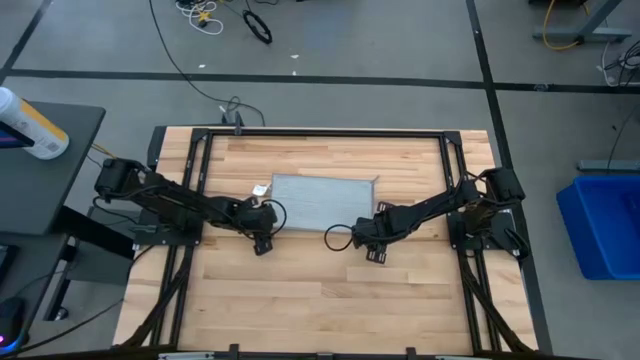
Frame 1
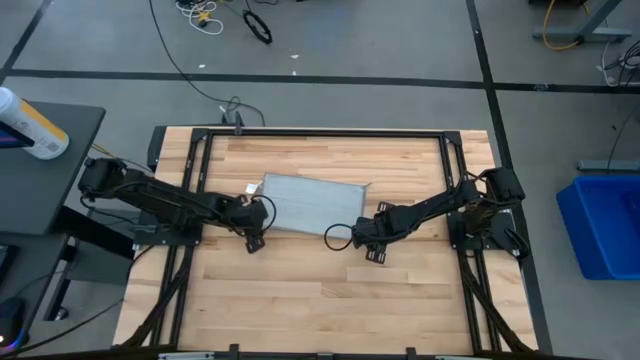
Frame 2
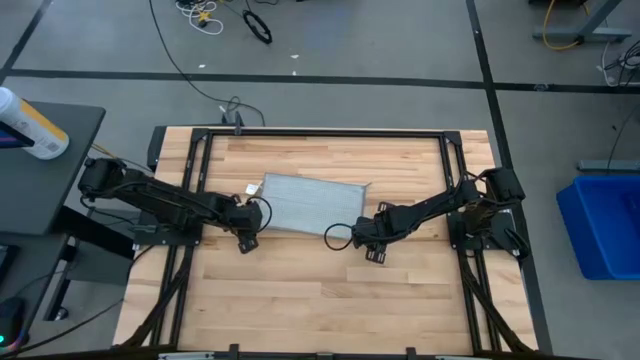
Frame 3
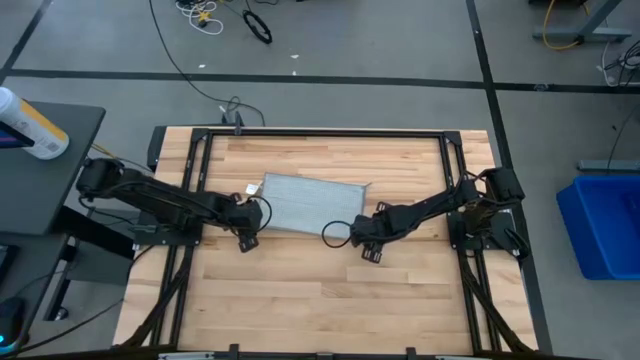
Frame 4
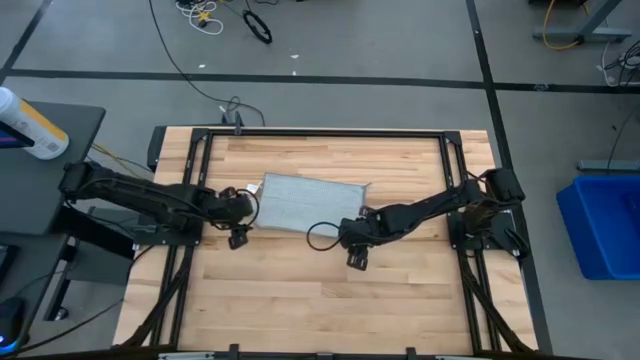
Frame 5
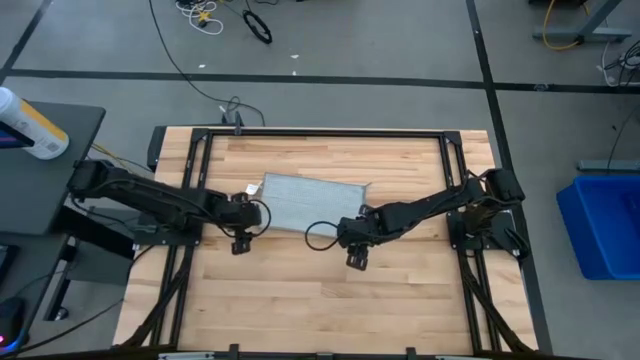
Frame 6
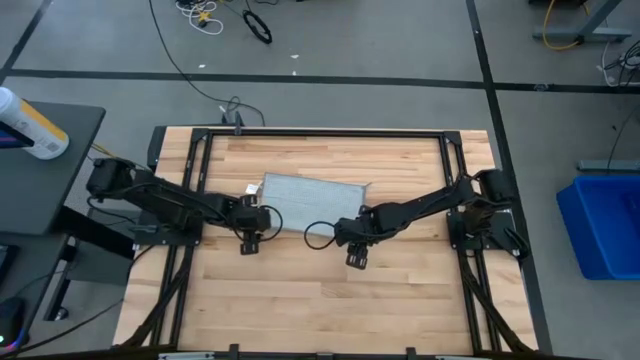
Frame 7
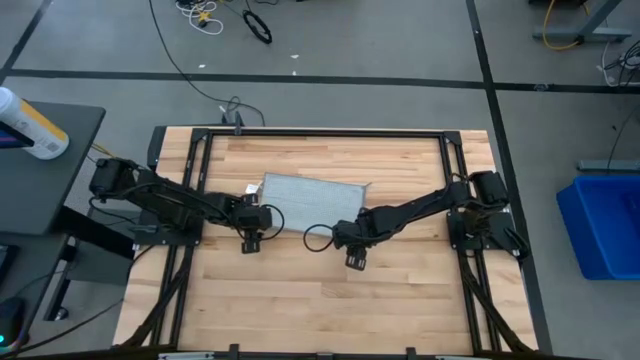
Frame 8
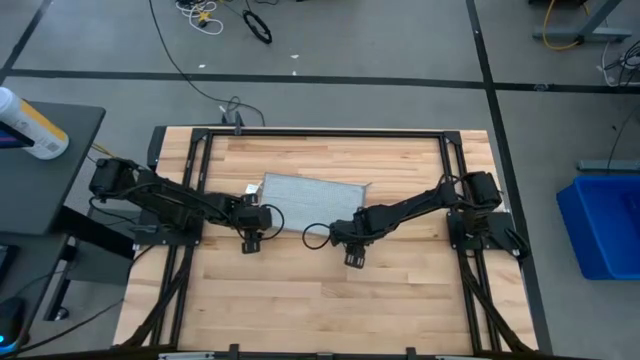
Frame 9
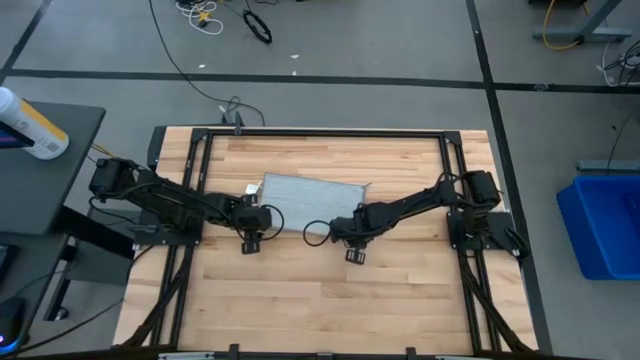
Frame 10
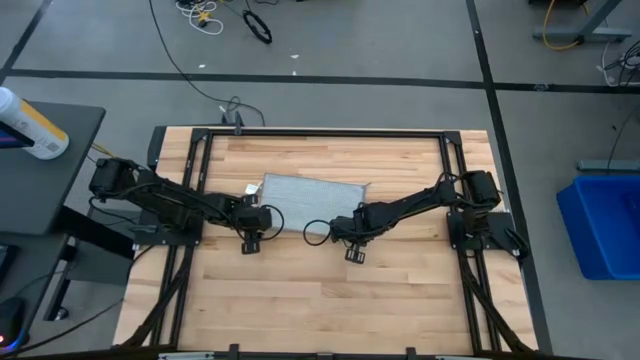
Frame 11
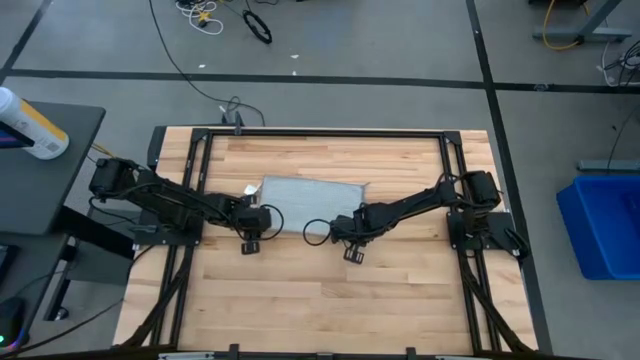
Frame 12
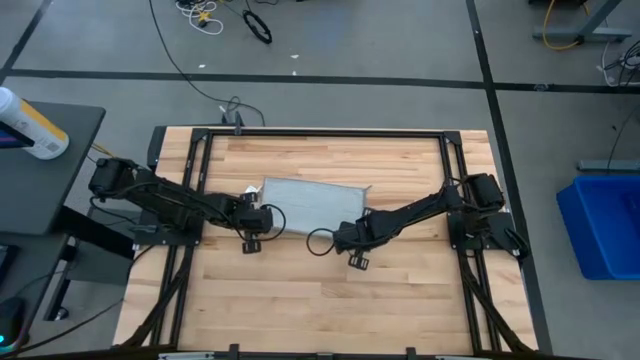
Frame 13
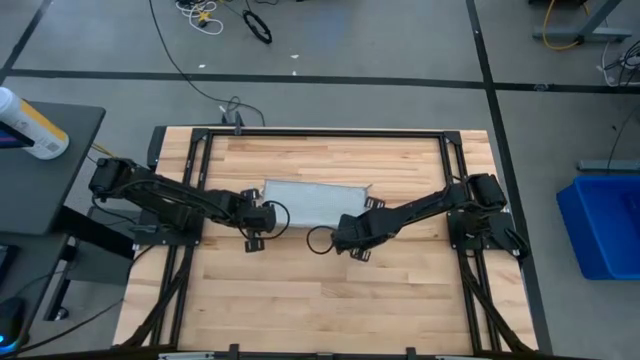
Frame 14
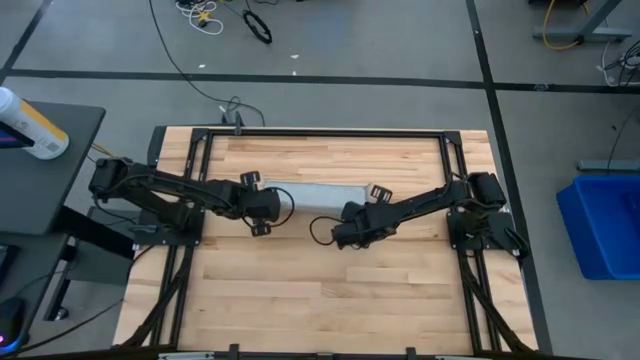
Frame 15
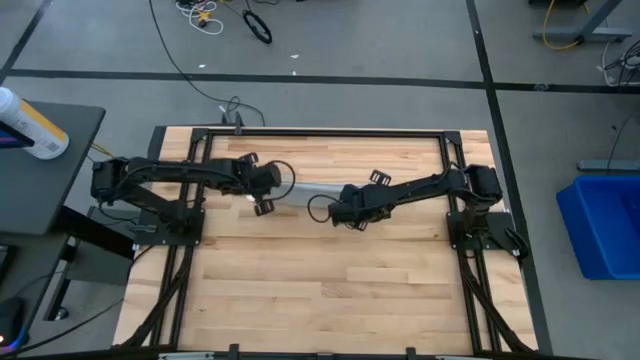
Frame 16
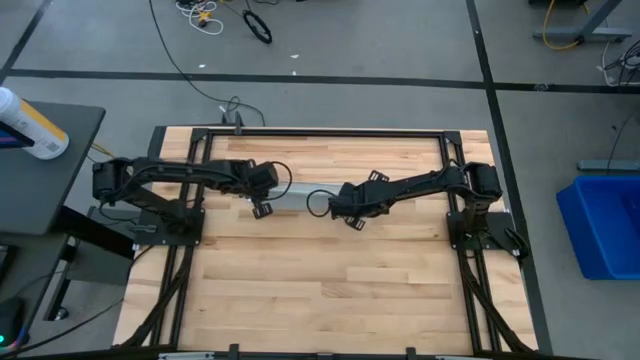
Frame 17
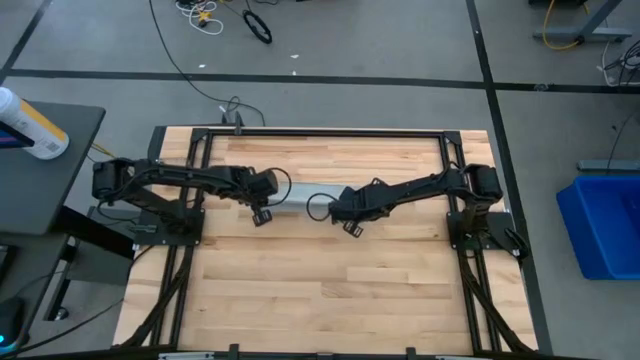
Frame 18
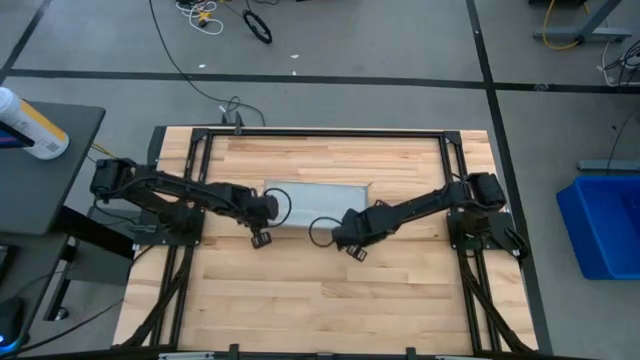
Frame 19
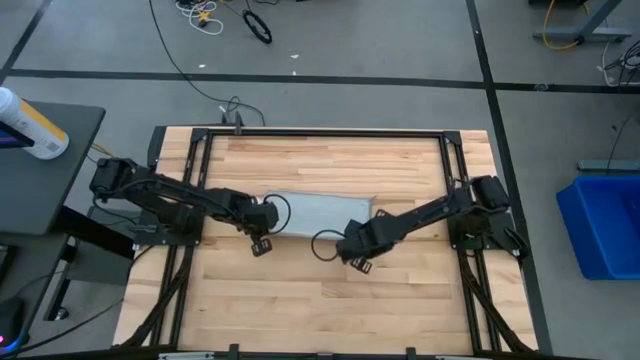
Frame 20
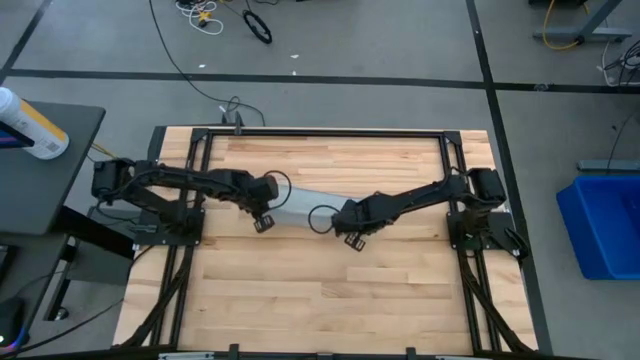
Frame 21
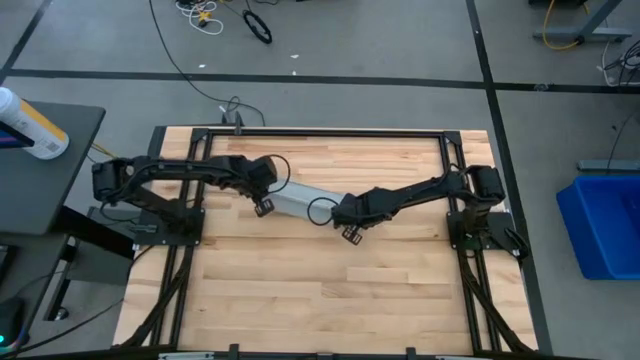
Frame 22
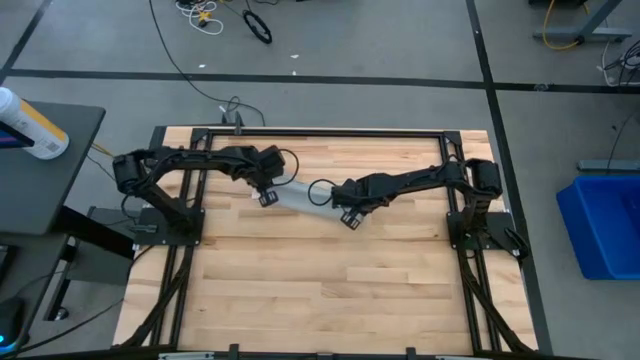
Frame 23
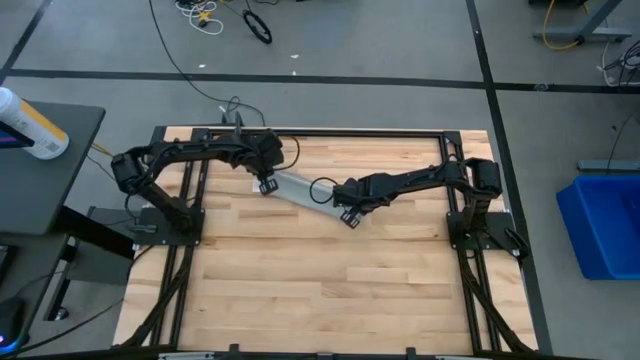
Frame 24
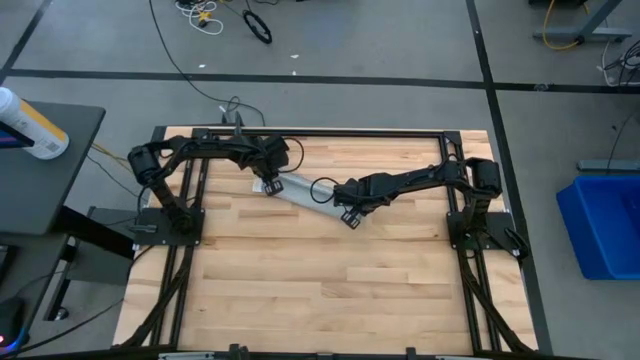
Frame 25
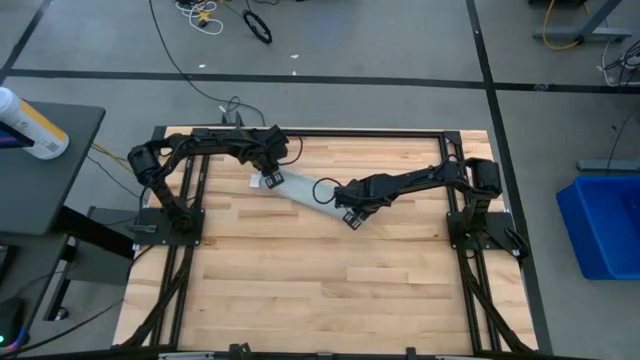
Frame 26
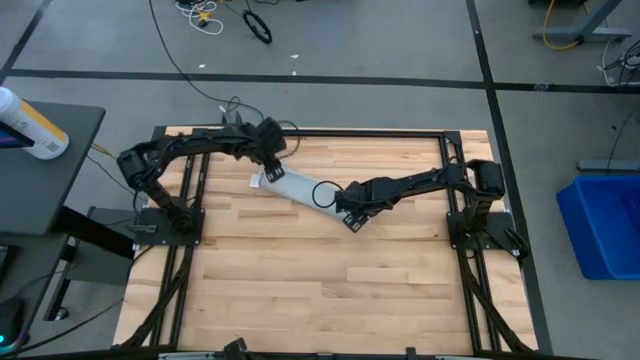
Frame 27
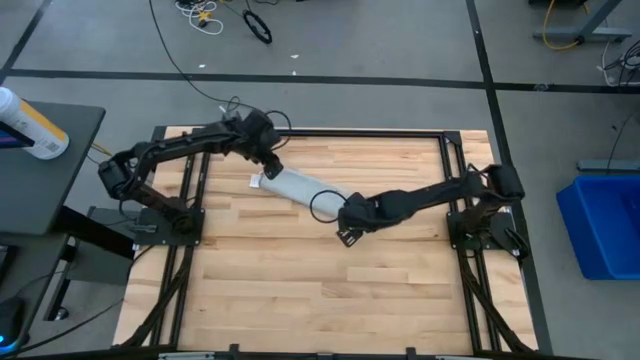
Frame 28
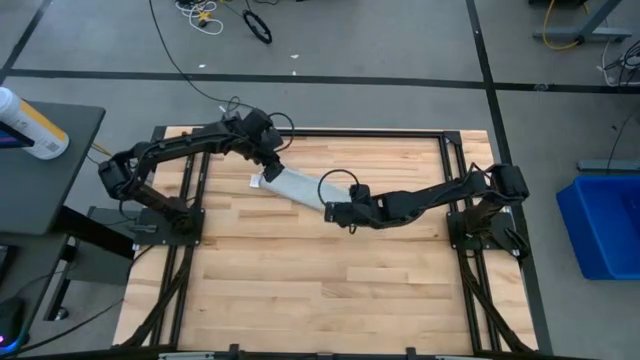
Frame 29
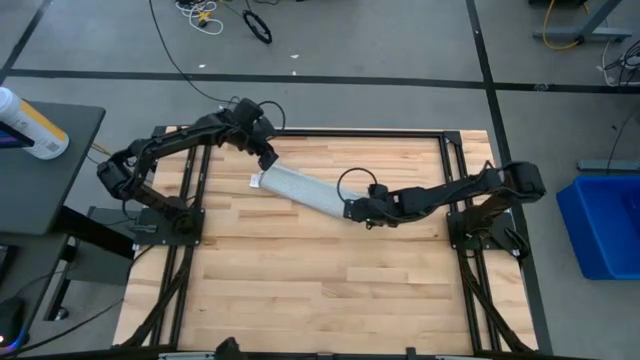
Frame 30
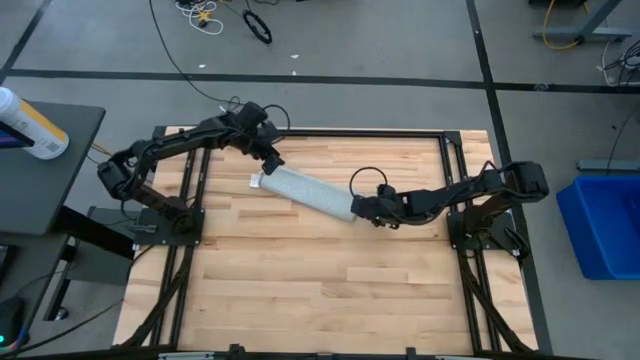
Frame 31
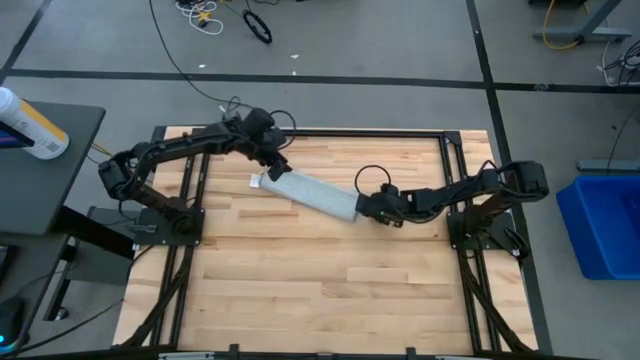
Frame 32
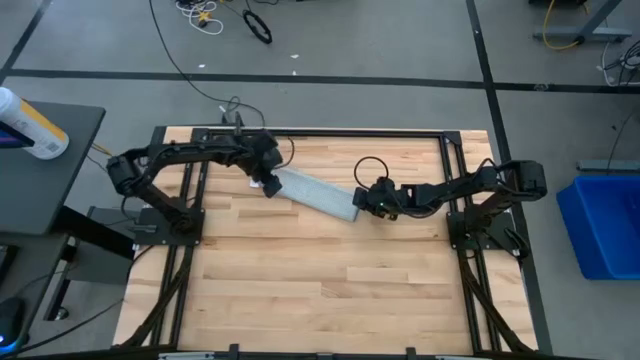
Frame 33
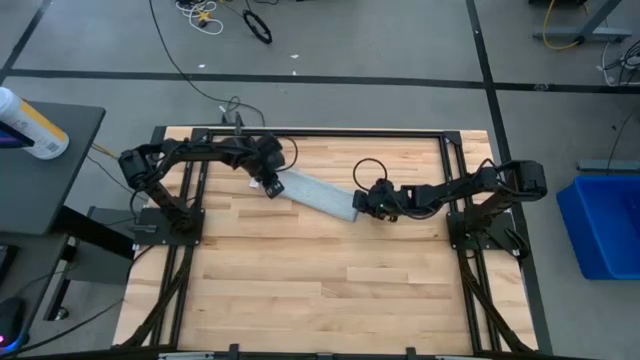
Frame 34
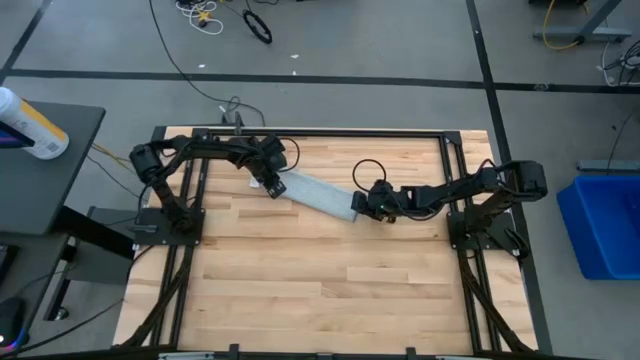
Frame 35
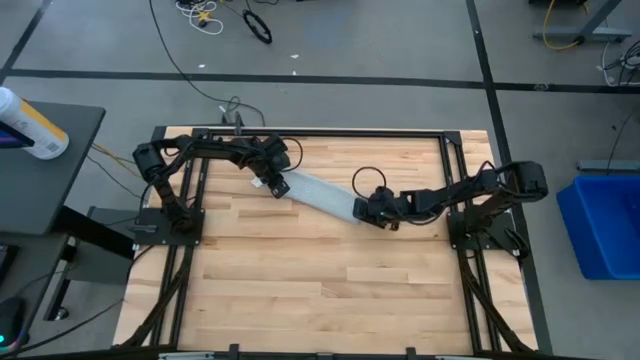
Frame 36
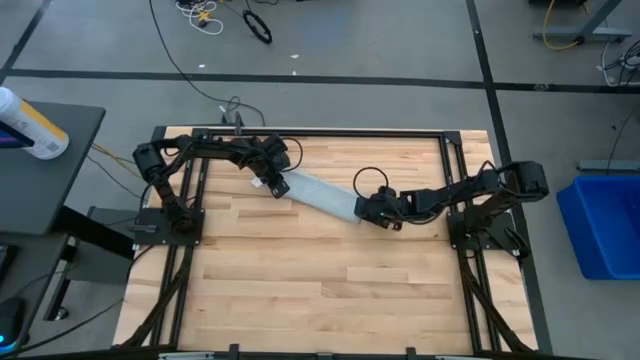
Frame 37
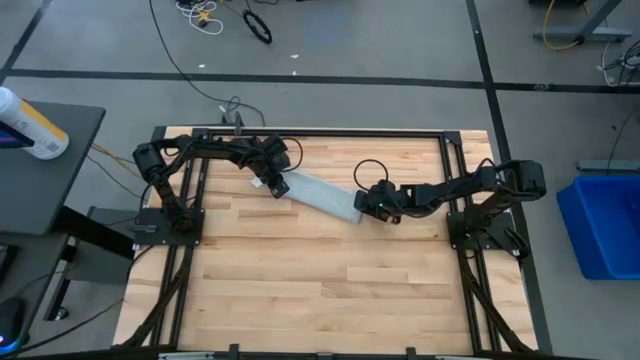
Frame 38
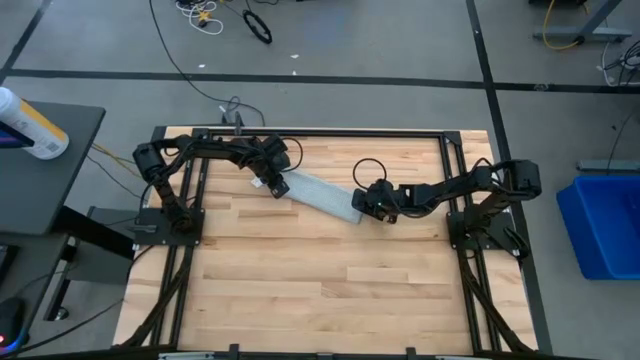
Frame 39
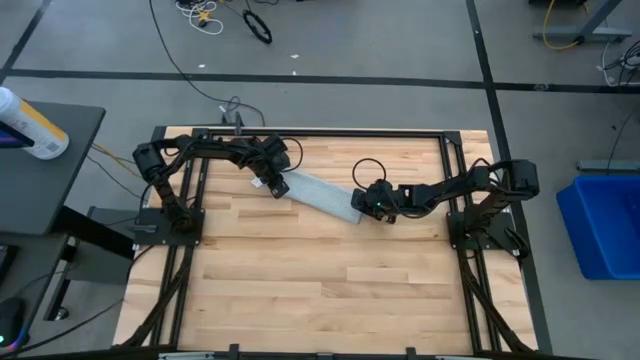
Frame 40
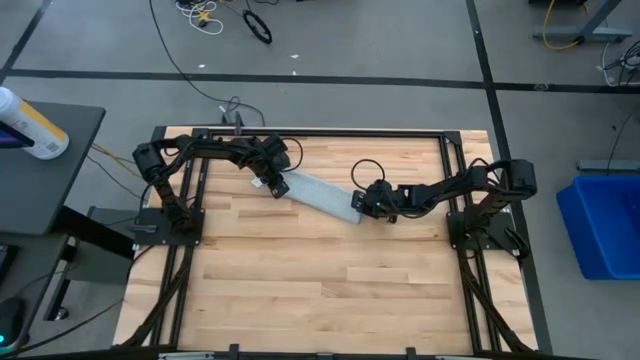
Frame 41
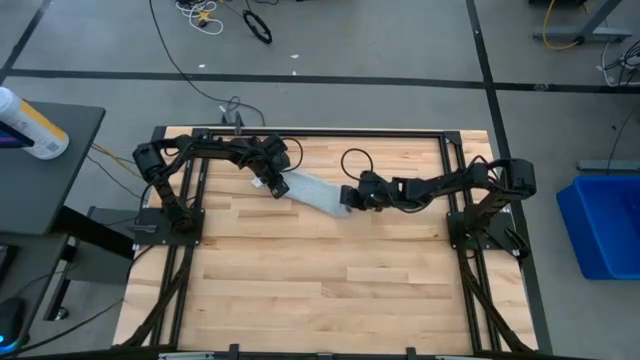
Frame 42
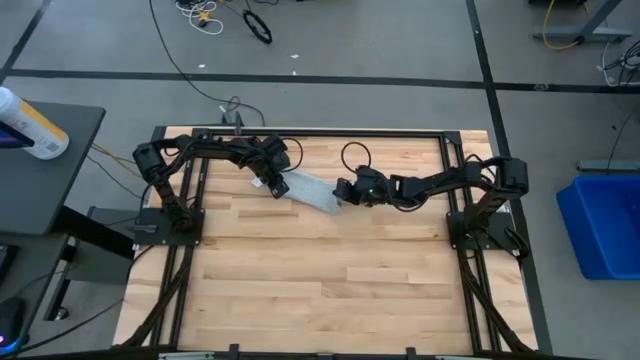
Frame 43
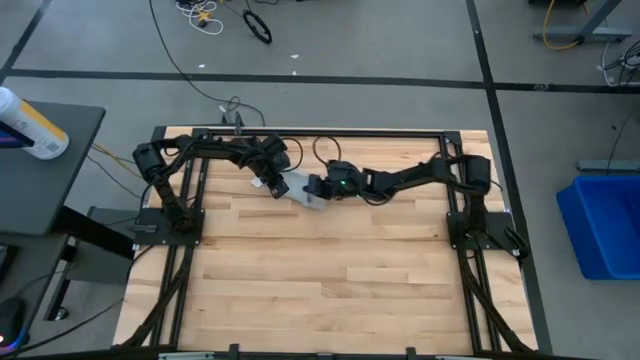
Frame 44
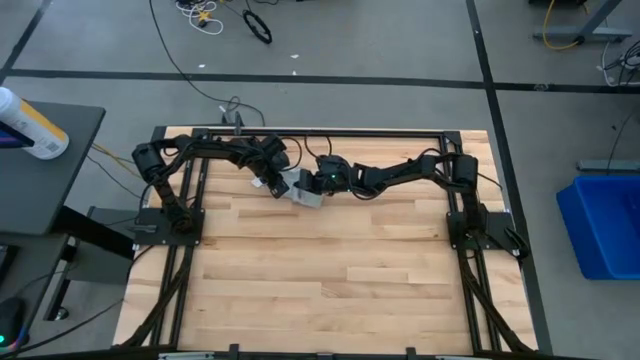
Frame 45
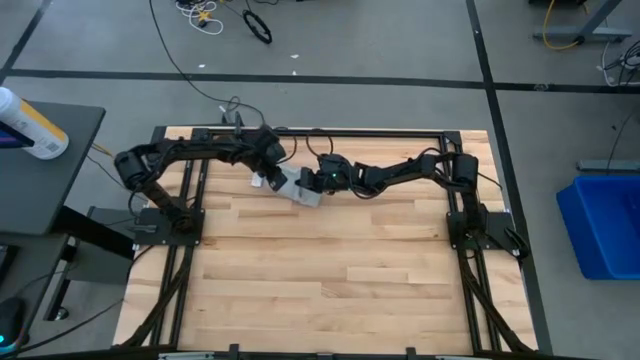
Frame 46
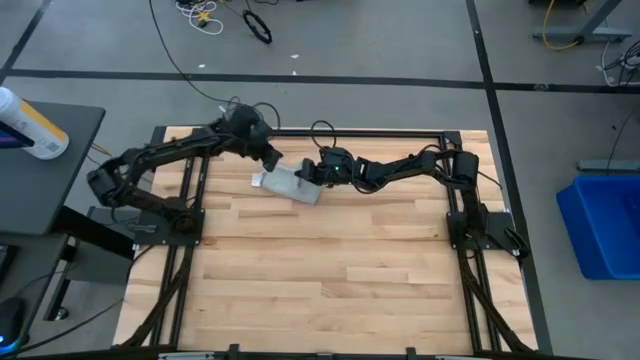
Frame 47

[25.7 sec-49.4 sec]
Task: Fold microfiber towels
Fold the gray towel
